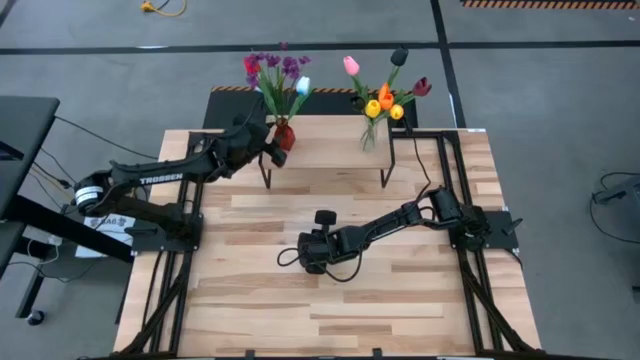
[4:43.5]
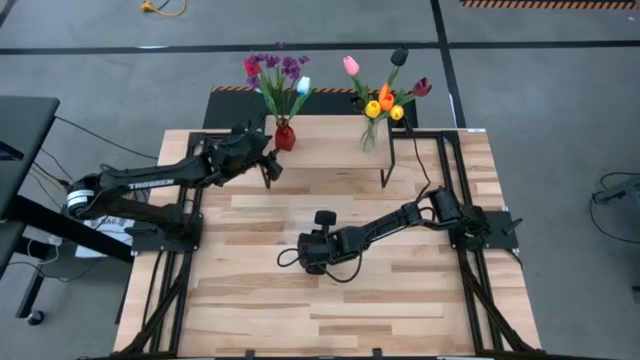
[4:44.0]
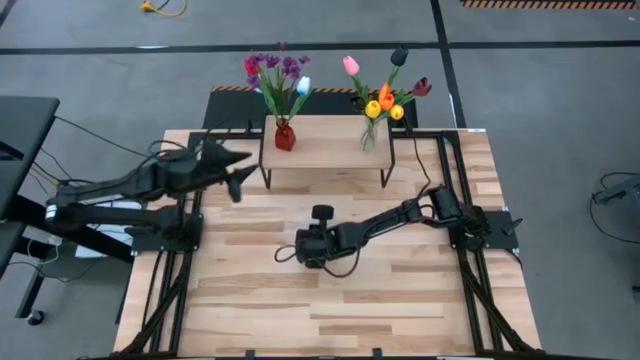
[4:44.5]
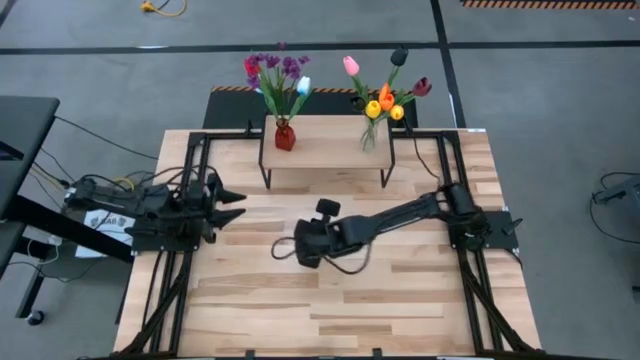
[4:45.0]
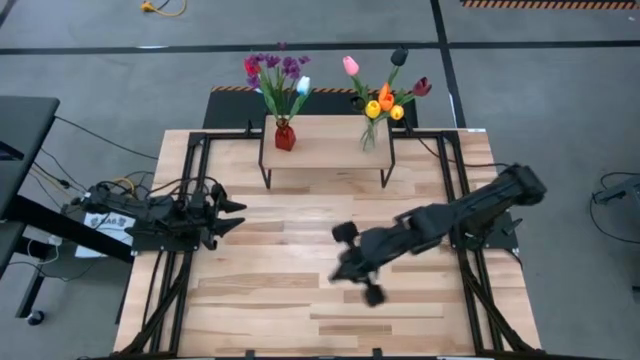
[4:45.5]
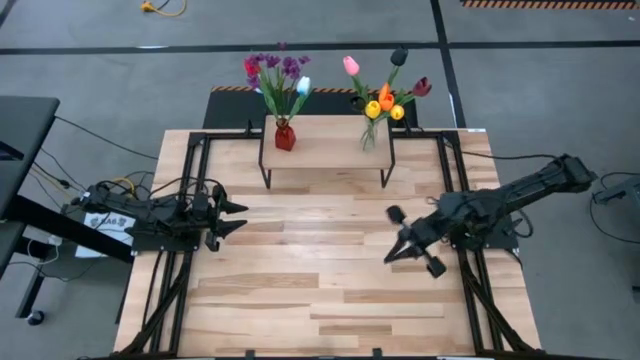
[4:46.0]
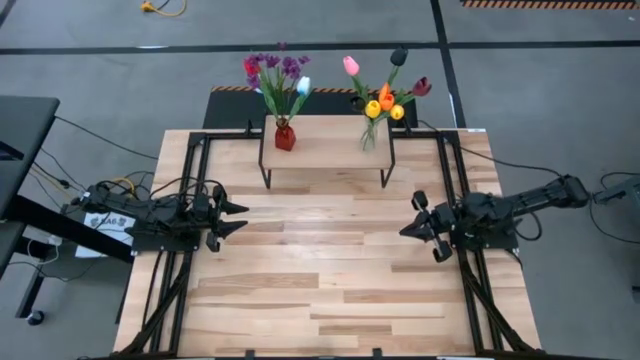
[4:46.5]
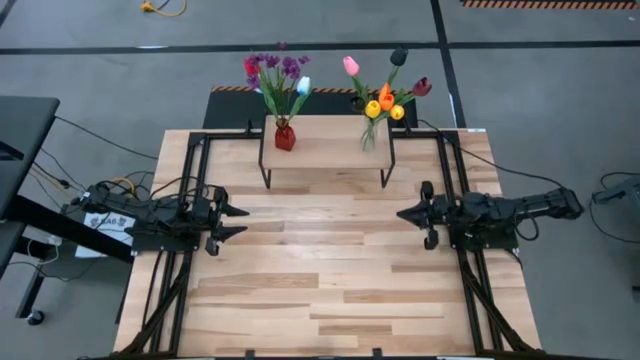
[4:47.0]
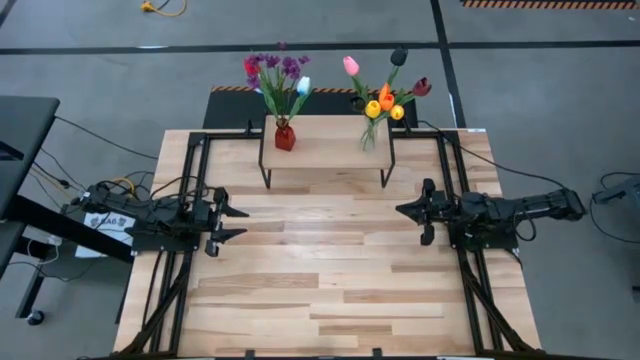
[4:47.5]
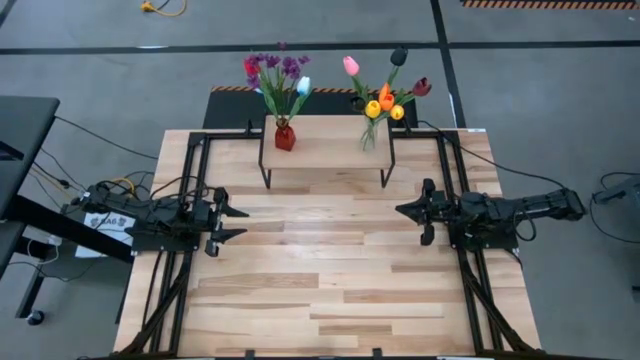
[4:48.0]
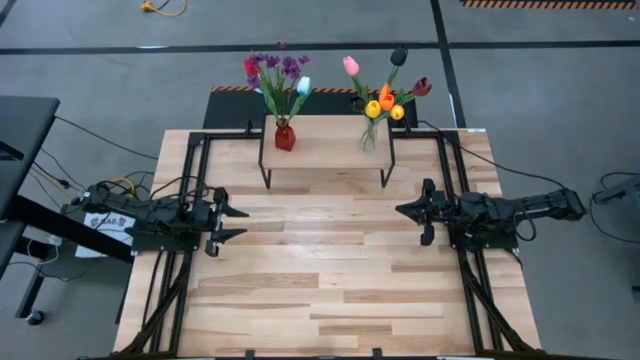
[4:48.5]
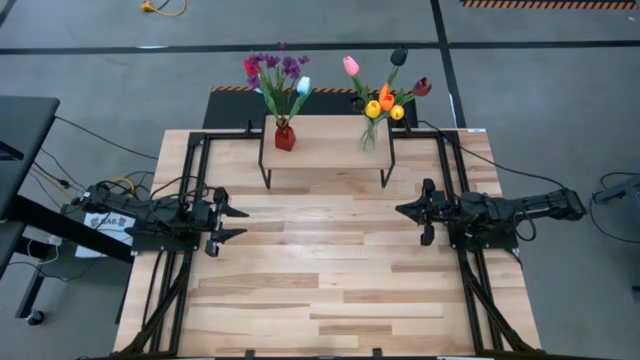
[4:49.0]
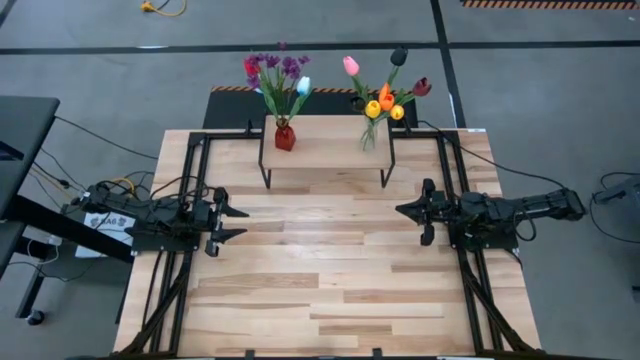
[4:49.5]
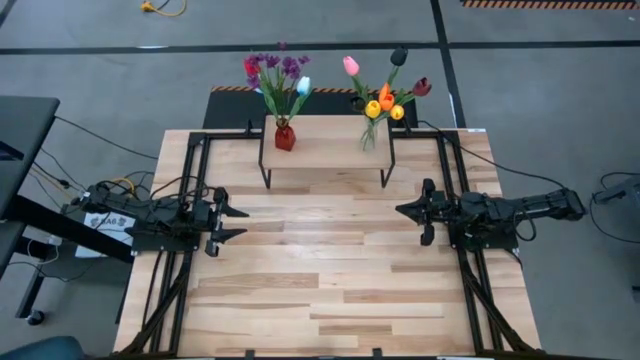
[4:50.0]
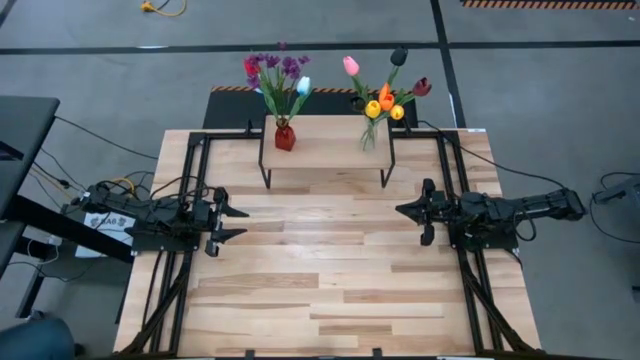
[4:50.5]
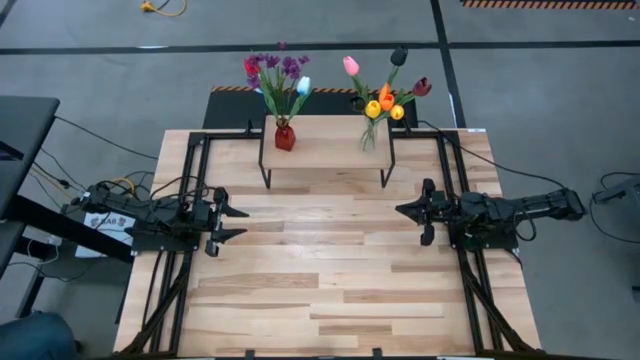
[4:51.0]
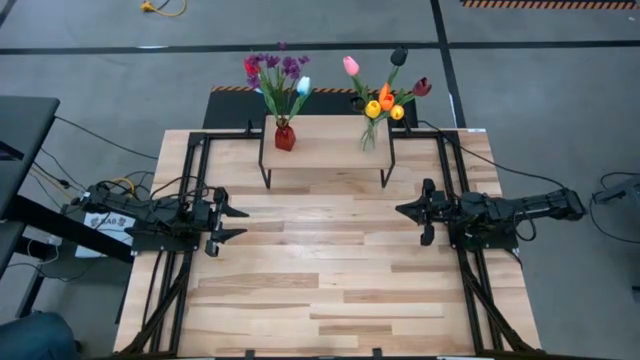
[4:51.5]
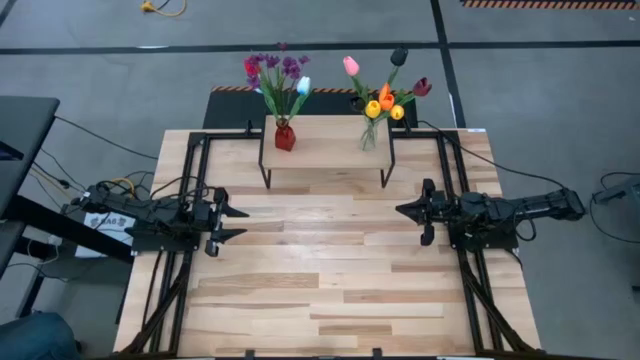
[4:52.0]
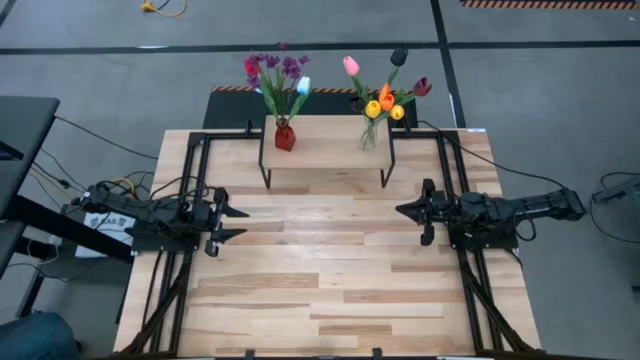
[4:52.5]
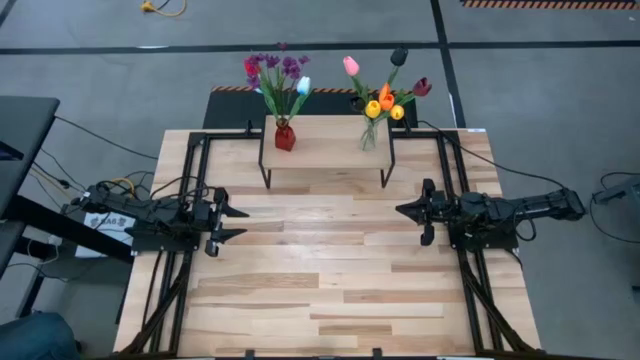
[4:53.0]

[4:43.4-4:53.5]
Task: Pick and place flowers into a vace then onto a shelf
Return to Home Position

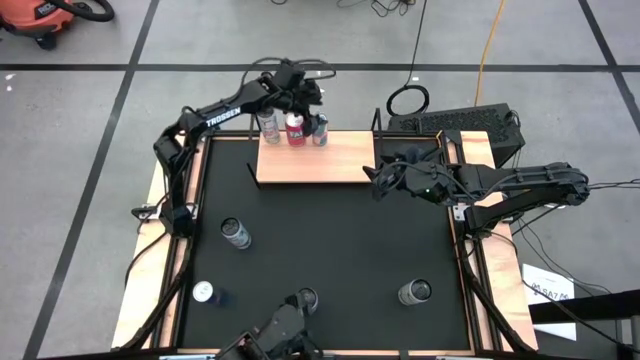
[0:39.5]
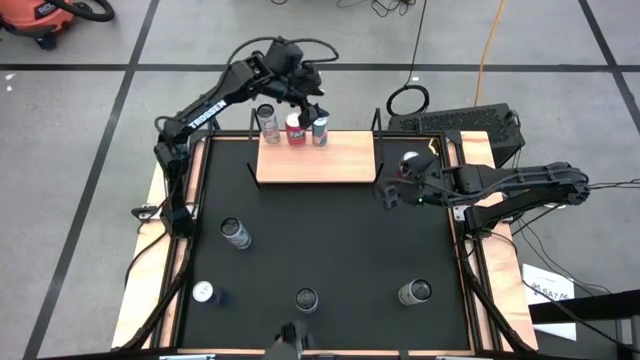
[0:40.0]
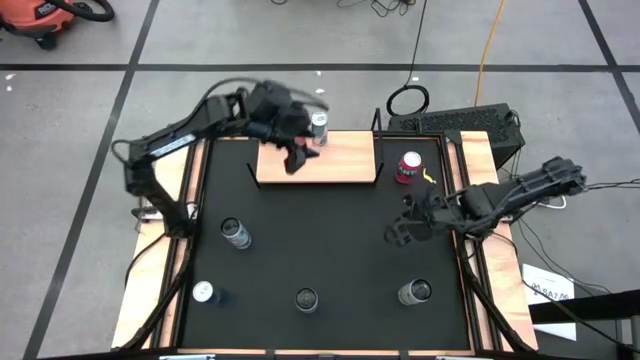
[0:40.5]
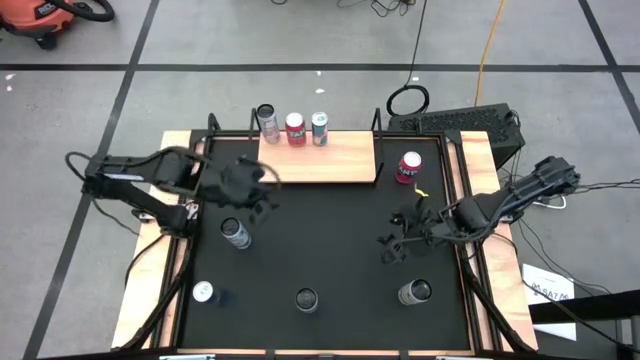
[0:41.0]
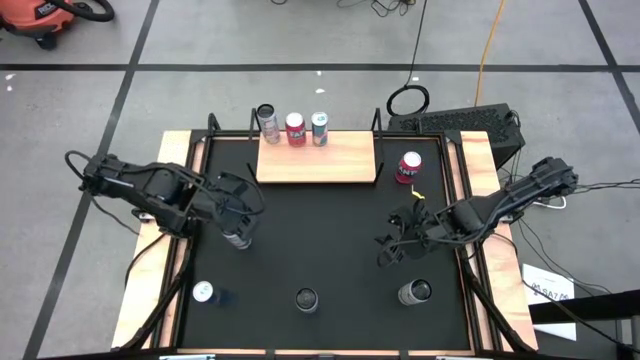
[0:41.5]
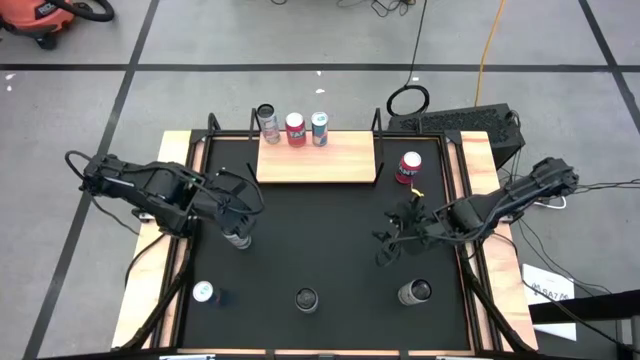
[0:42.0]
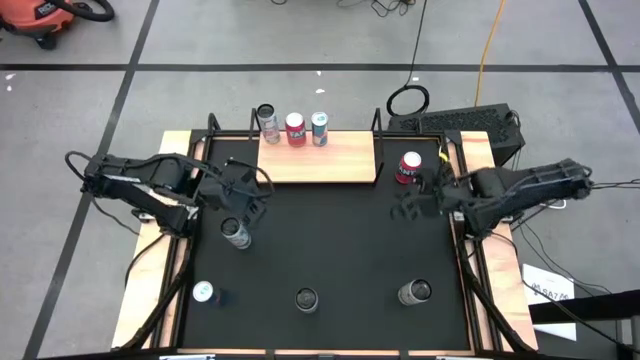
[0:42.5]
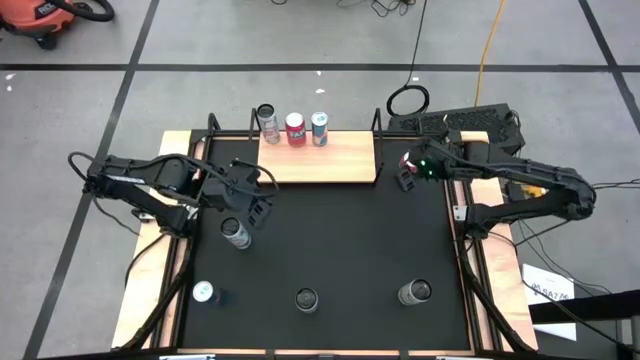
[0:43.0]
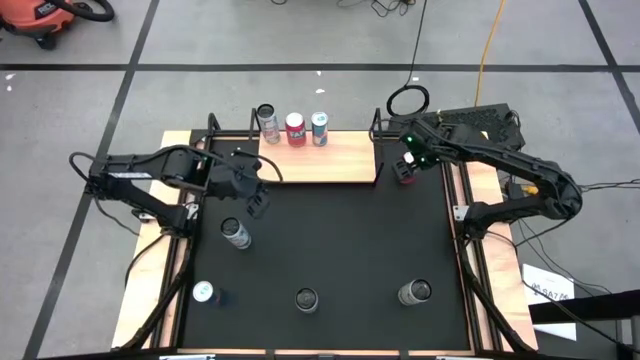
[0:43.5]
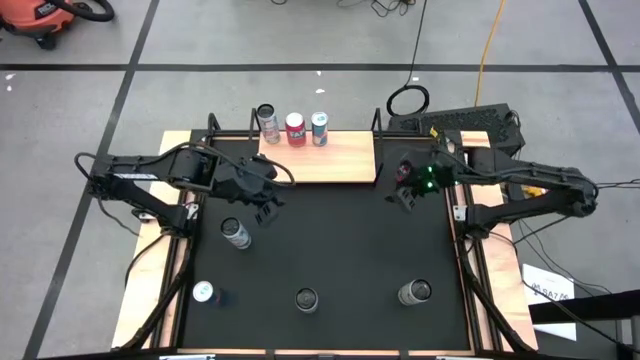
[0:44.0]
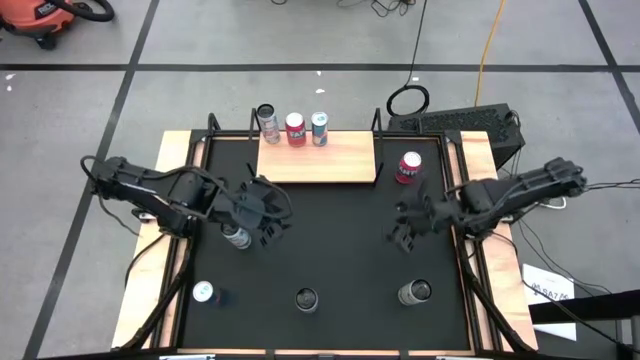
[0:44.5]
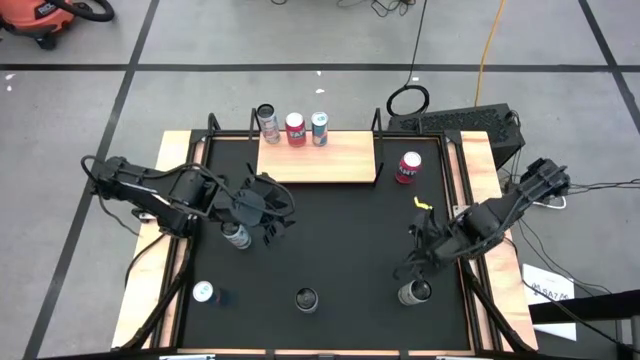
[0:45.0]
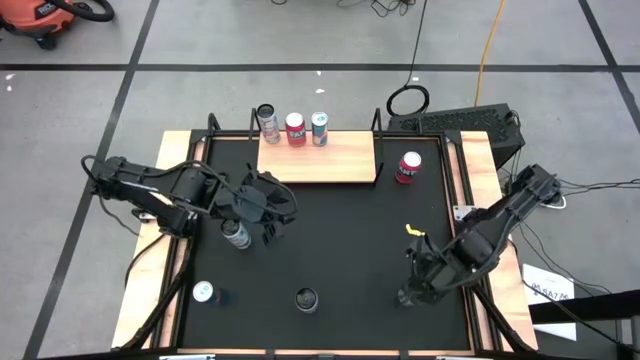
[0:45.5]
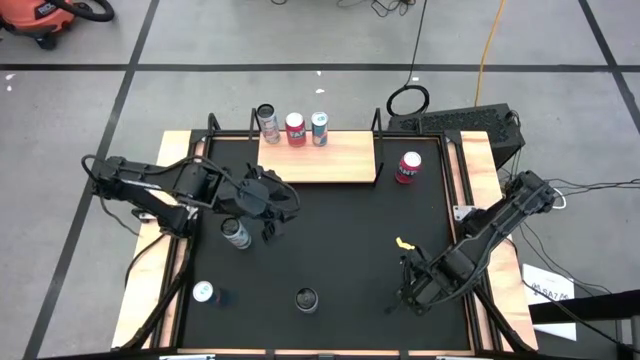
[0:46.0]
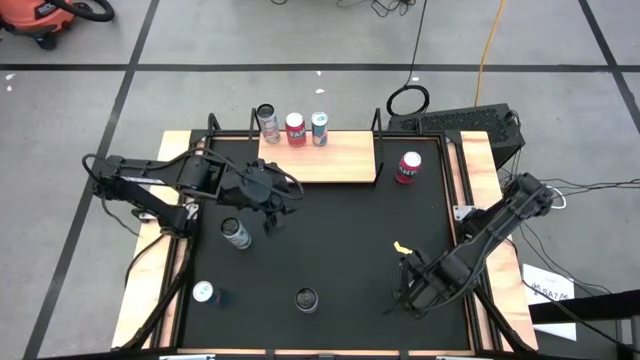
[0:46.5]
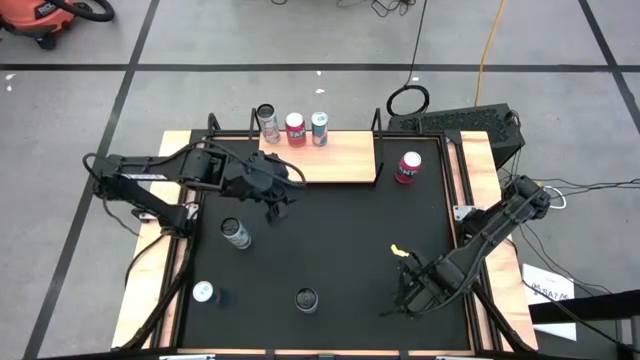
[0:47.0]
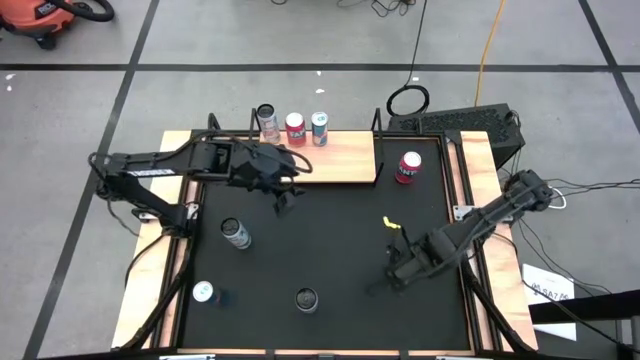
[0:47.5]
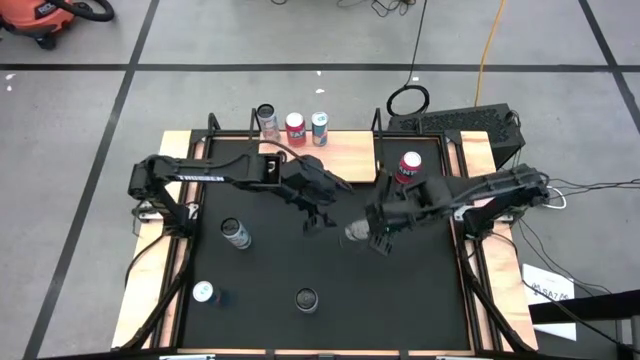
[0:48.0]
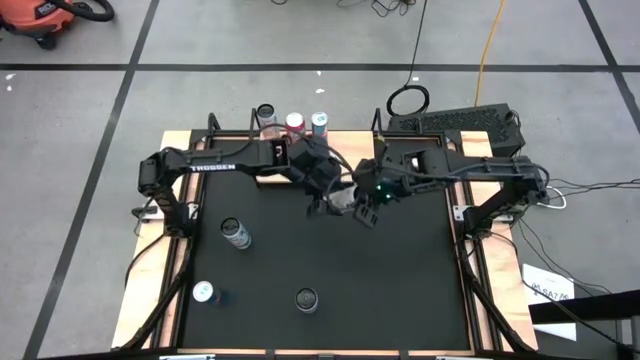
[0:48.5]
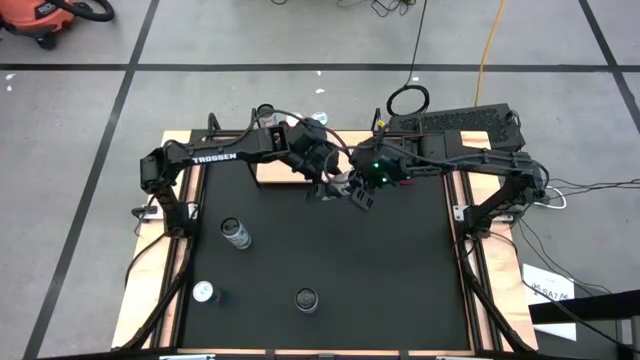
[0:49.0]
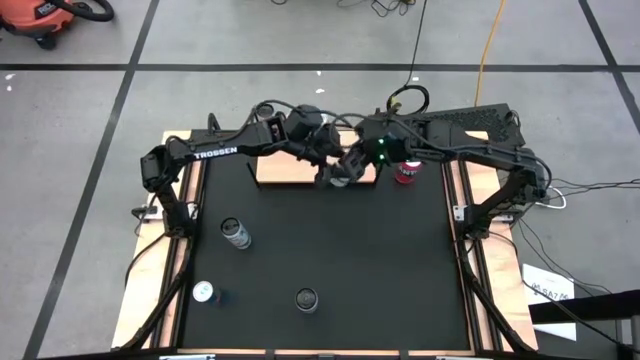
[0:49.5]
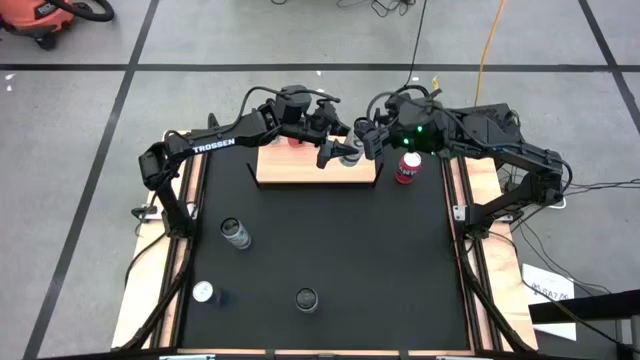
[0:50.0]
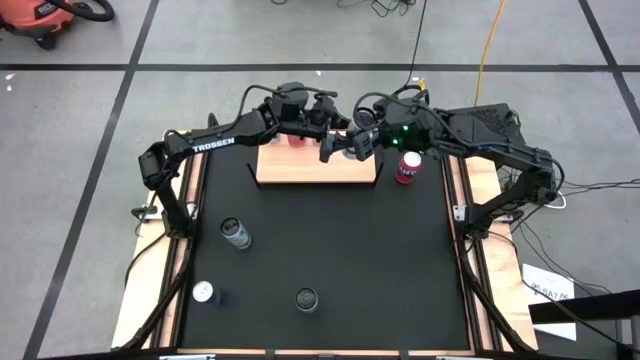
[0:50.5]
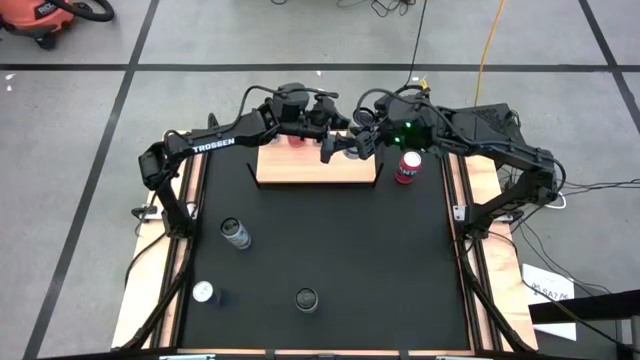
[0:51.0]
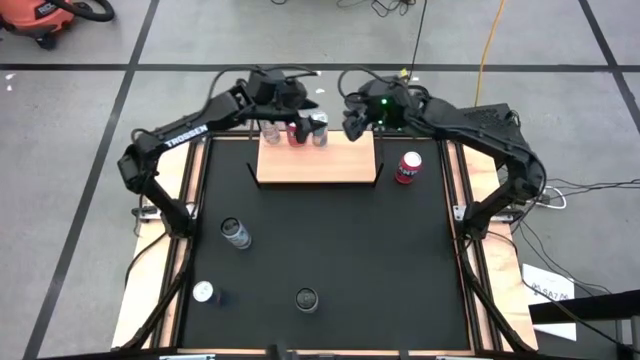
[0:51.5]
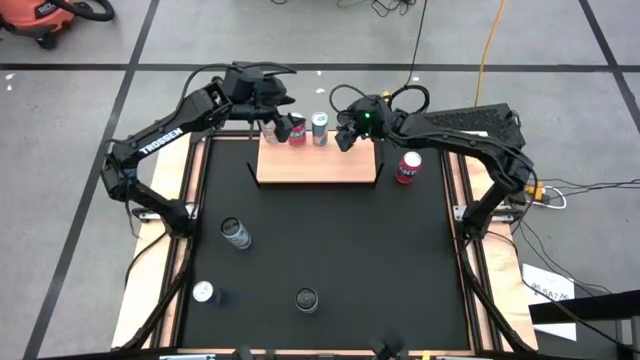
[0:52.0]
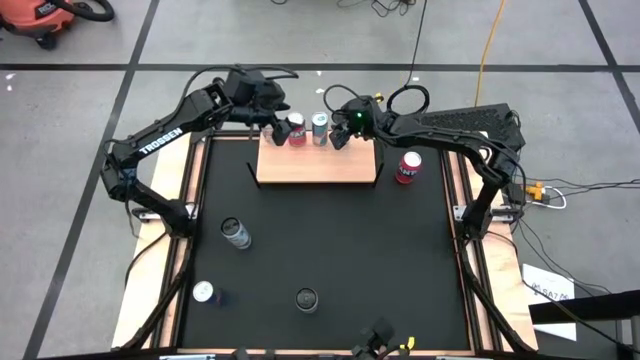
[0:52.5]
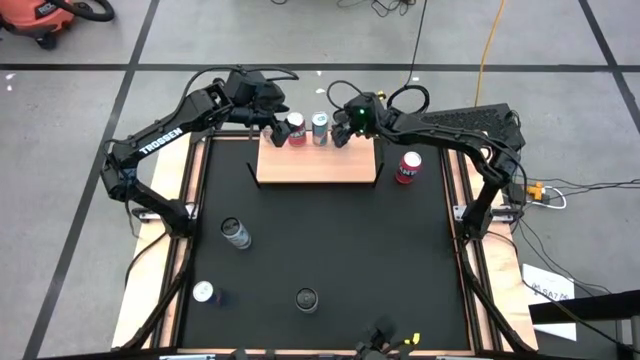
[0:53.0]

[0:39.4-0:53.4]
Task: Place canned beverage on shelf
Put the right white-yellow soda can on the shelf
